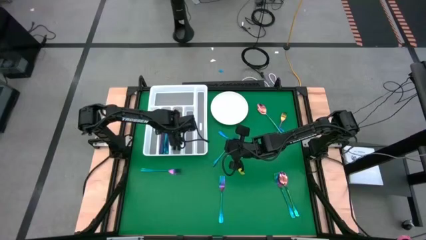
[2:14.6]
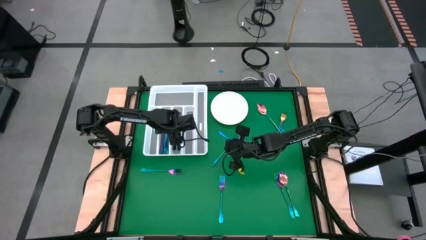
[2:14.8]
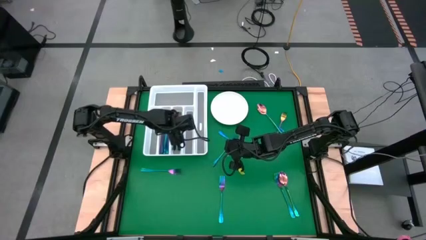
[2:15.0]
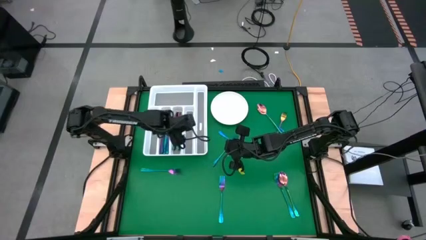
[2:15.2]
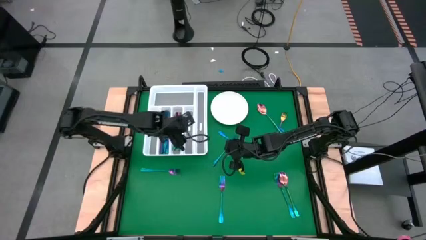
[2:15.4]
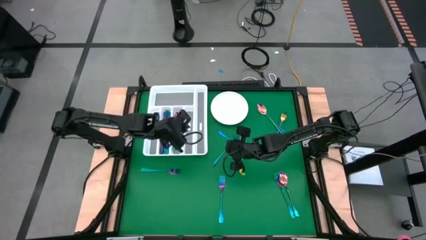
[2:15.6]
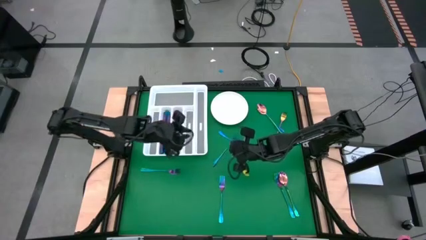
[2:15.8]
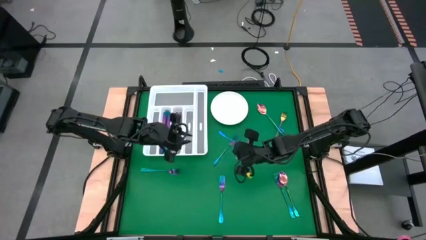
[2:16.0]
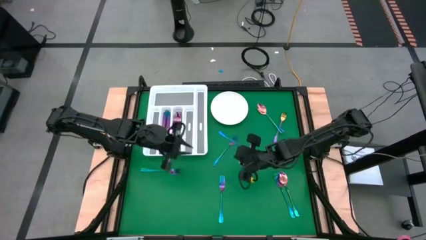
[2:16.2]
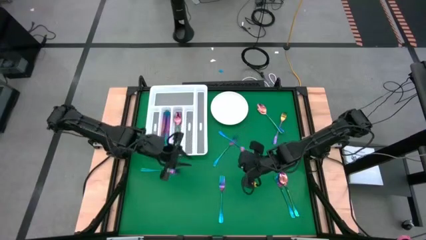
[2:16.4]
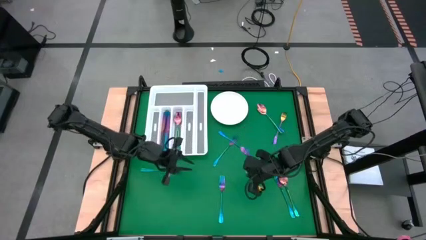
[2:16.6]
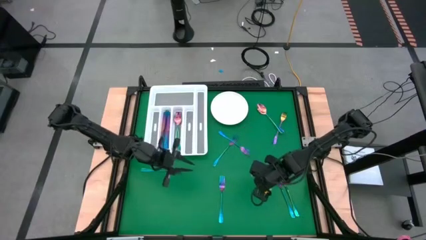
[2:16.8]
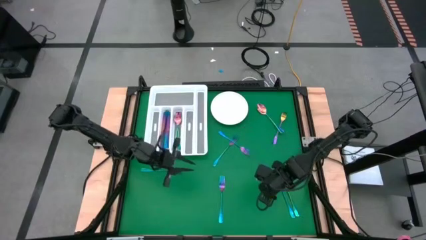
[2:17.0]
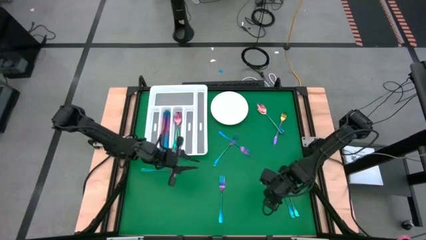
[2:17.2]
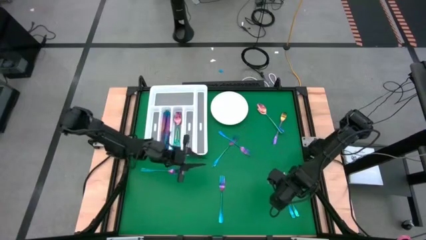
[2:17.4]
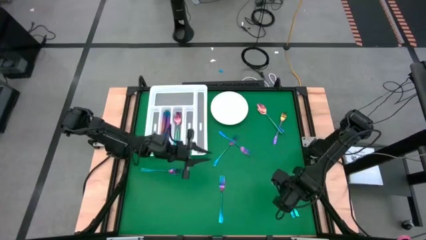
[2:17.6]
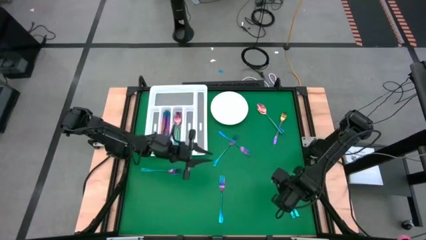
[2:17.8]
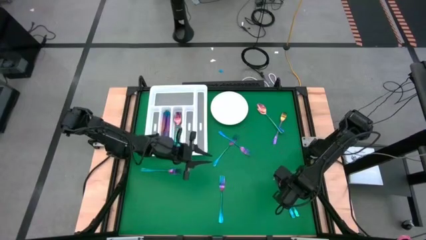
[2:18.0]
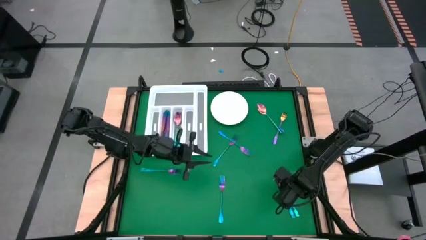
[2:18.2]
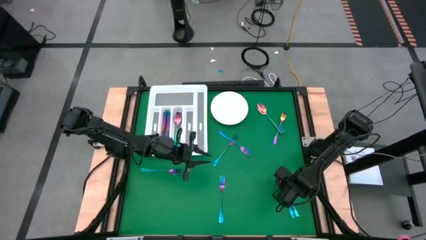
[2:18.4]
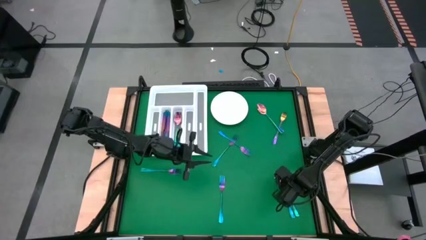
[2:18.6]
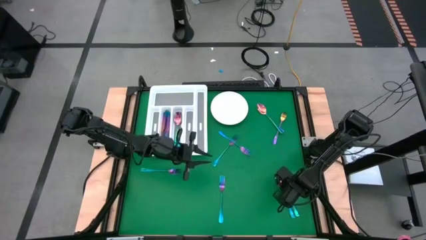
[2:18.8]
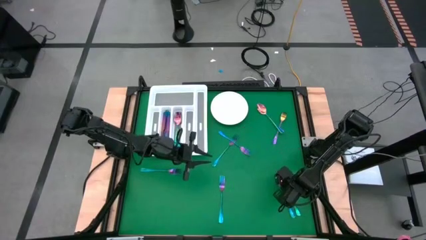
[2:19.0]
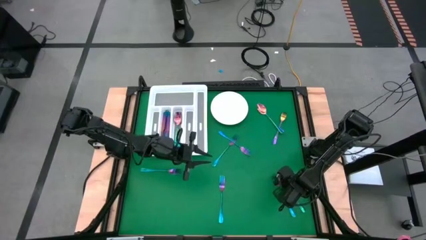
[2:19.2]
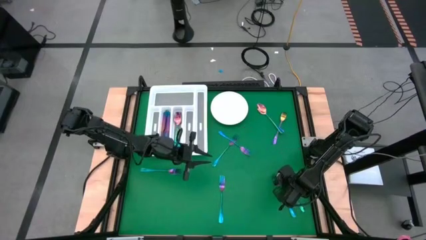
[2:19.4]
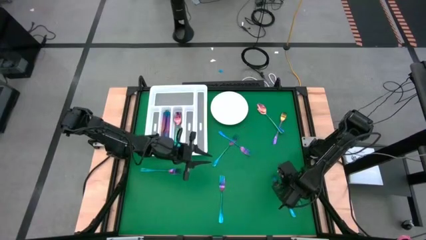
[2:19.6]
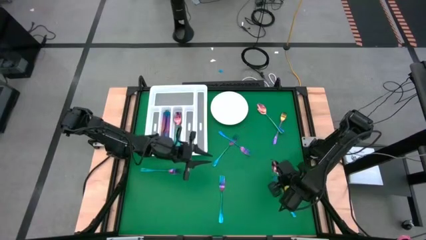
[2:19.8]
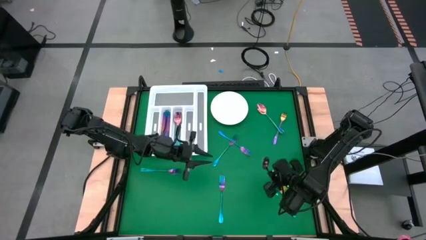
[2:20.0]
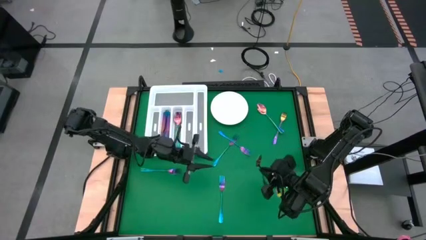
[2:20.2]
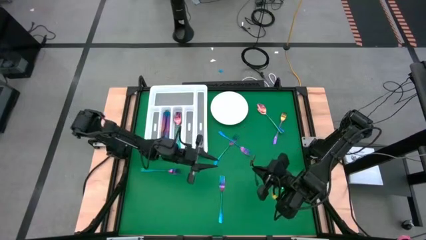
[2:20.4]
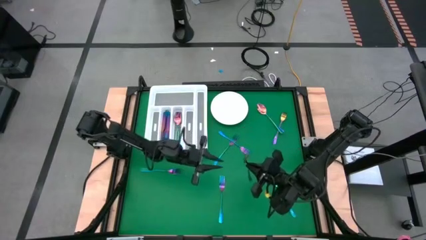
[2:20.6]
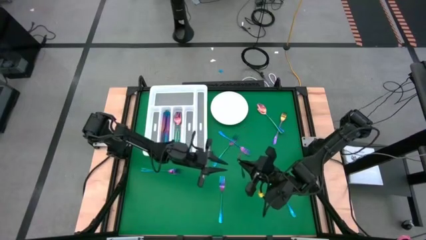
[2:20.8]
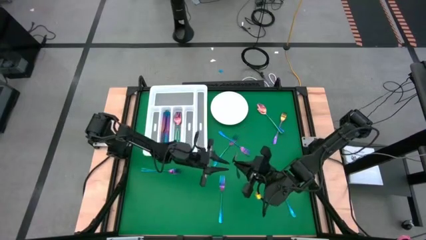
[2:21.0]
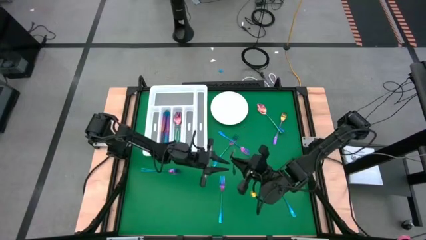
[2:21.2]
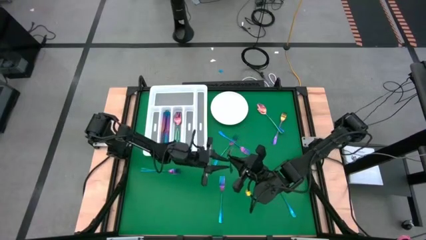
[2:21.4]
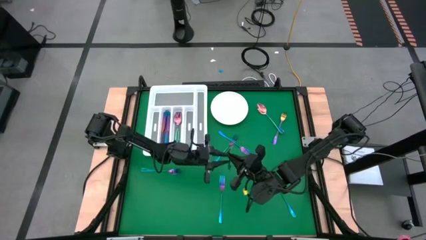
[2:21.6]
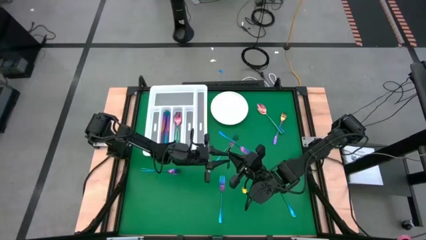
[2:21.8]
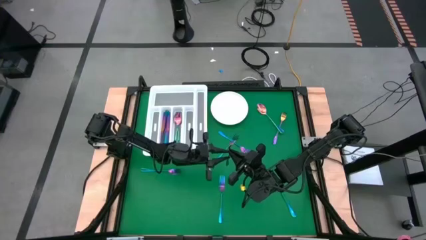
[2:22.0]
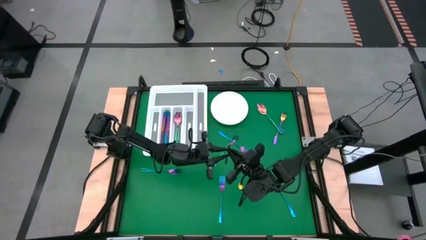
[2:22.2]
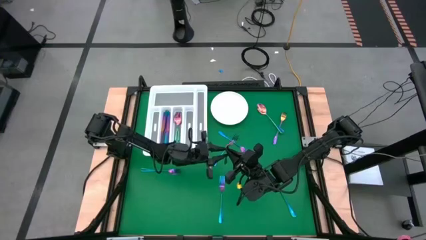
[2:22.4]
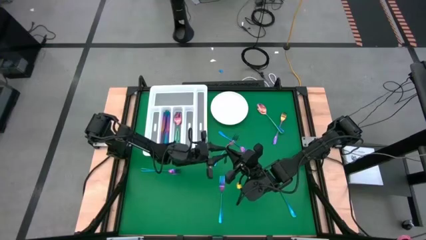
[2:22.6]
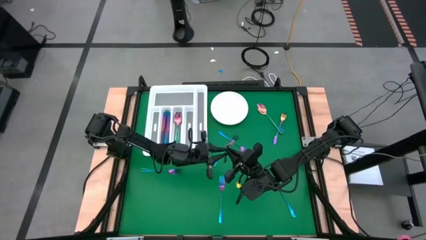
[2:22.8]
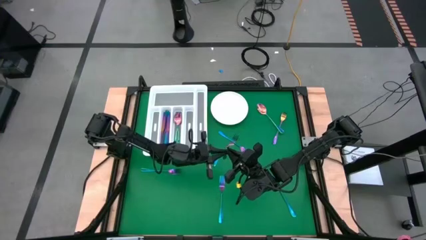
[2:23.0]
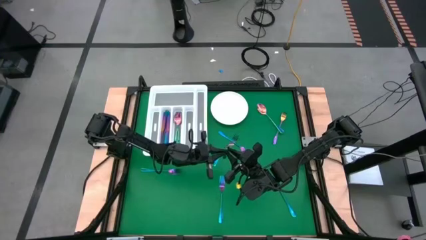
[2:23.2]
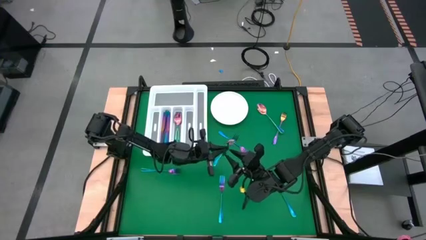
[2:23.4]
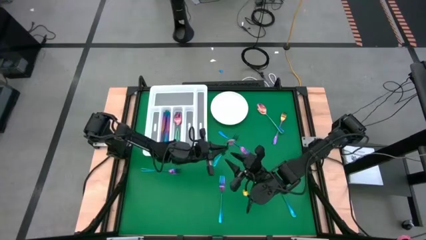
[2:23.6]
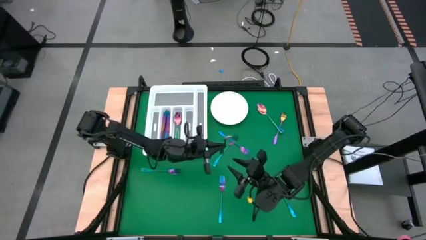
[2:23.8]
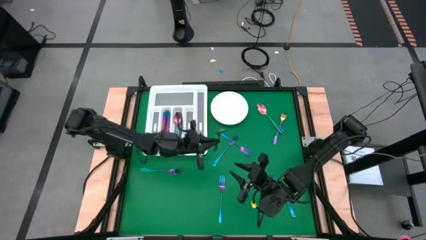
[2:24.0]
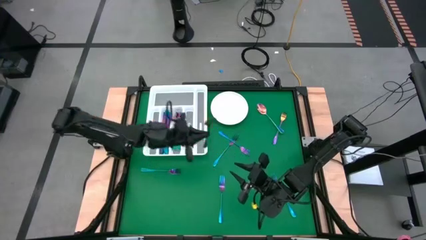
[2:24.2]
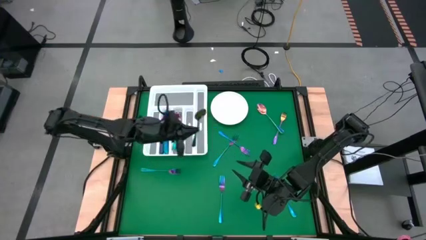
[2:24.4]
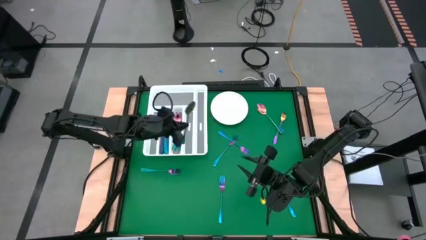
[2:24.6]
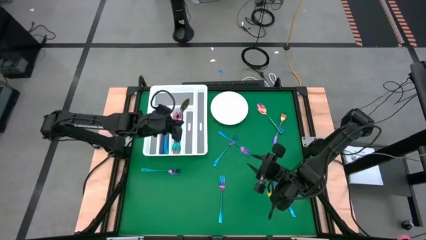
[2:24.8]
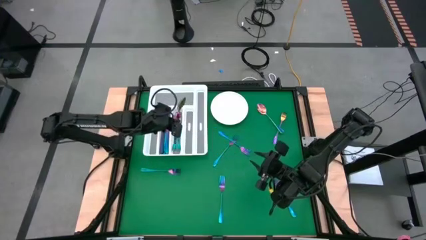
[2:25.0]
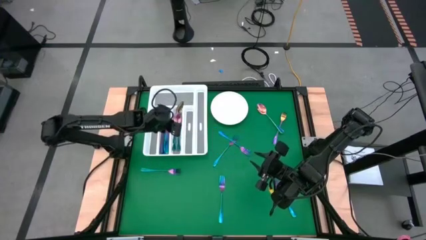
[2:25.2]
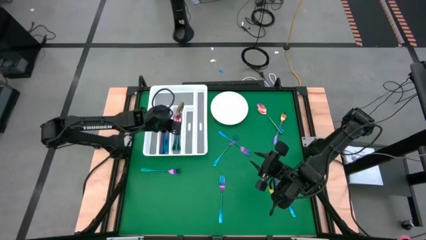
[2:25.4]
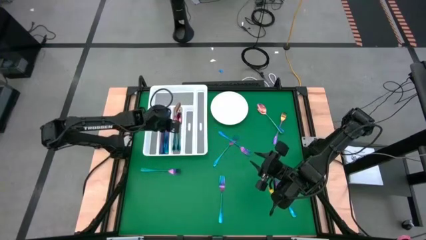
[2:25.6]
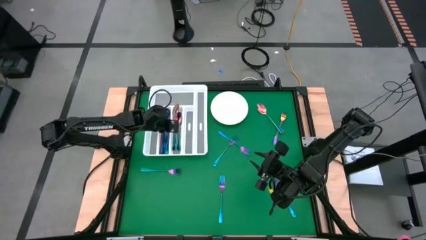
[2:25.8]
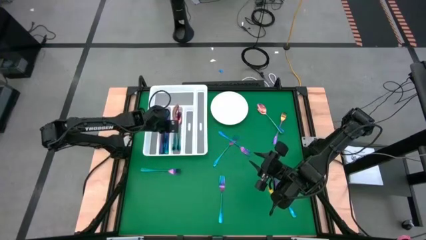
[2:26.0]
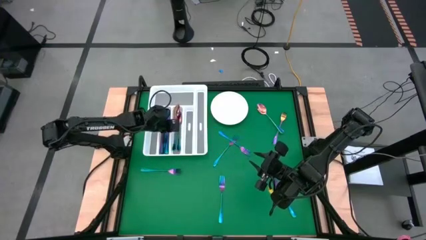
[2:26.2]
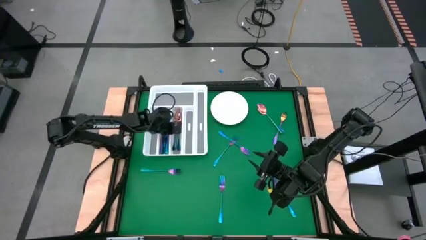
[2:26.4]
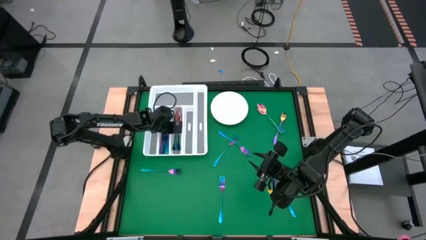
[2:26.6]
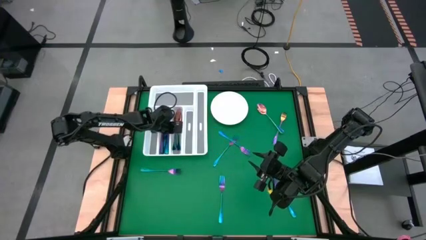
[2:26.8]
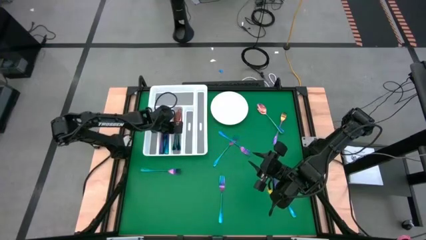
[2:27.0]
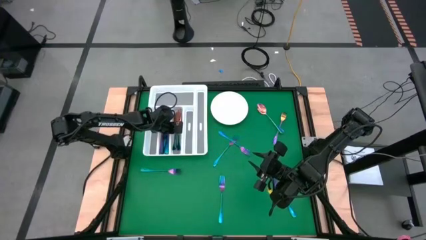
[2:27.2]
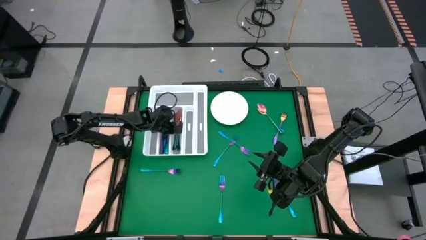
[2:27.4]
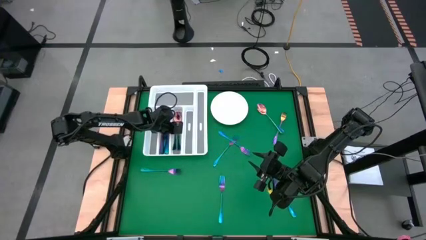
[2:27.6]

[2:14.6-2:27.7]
Task: Sort silverware
Put the blue spoon into the silverware tray
